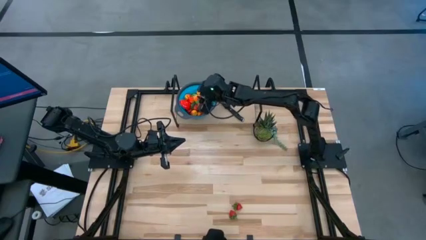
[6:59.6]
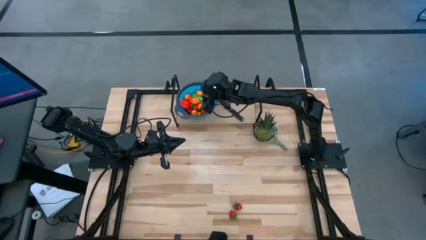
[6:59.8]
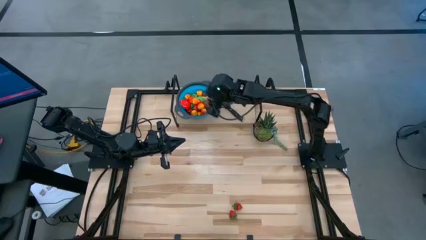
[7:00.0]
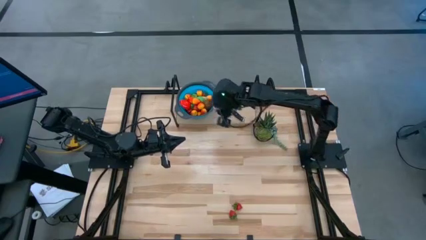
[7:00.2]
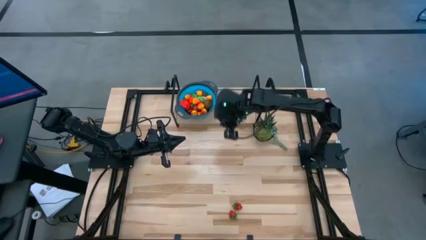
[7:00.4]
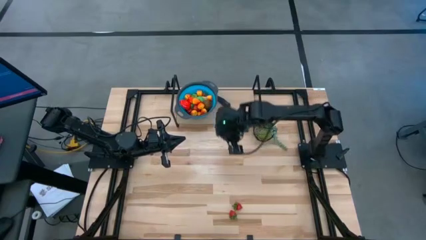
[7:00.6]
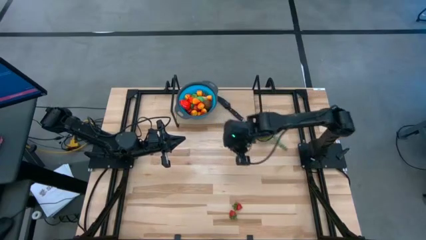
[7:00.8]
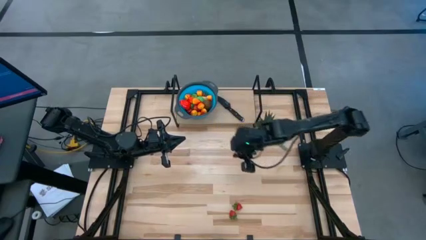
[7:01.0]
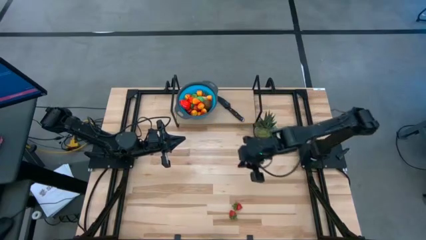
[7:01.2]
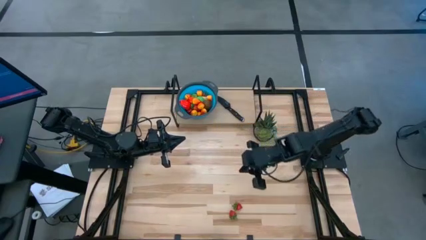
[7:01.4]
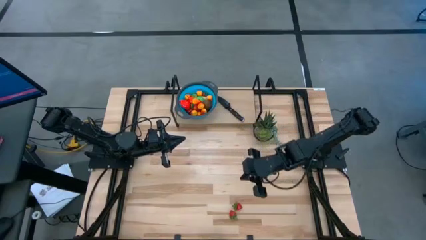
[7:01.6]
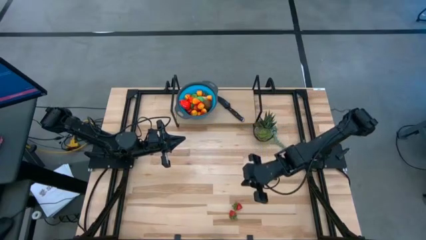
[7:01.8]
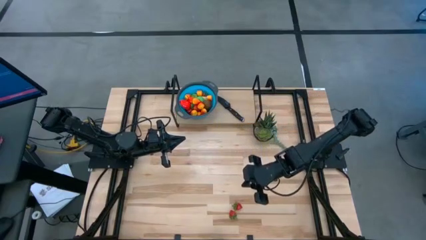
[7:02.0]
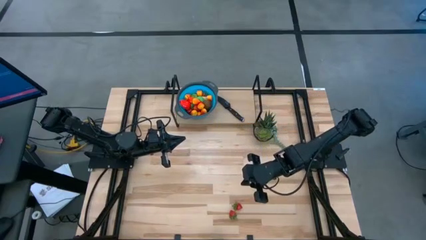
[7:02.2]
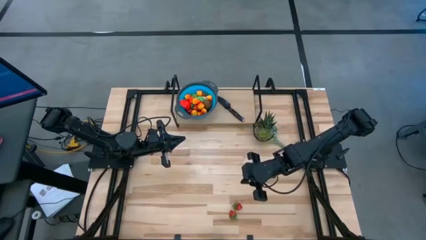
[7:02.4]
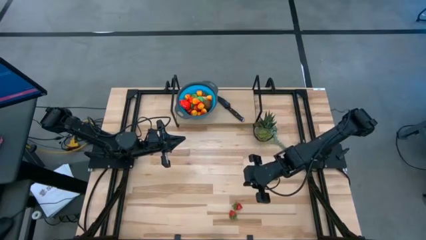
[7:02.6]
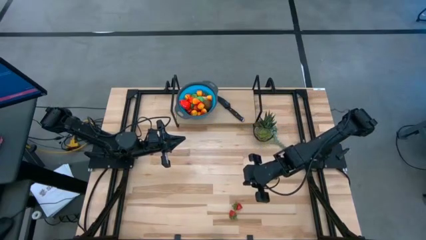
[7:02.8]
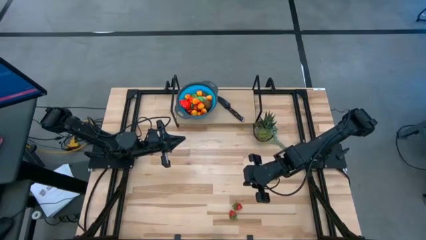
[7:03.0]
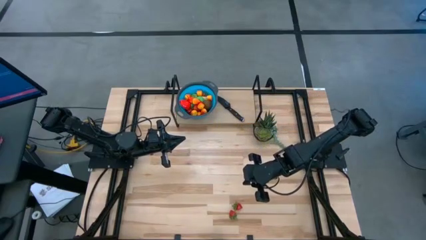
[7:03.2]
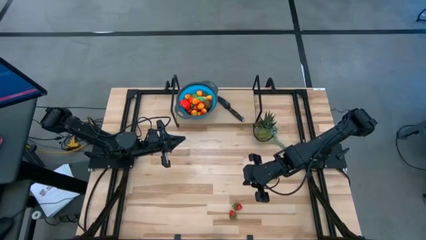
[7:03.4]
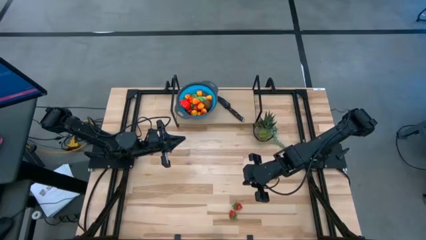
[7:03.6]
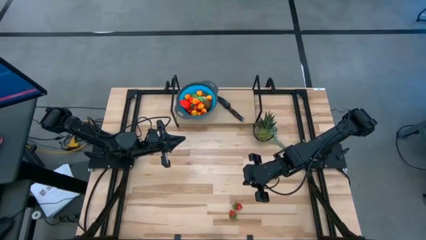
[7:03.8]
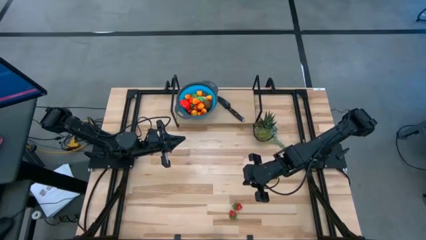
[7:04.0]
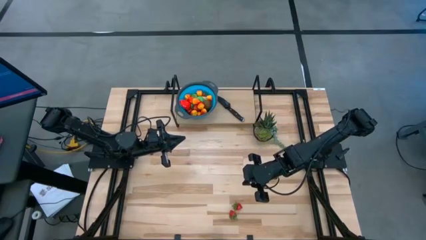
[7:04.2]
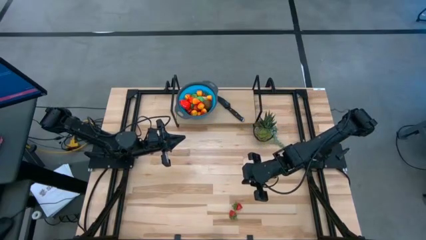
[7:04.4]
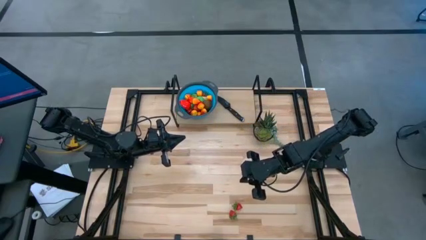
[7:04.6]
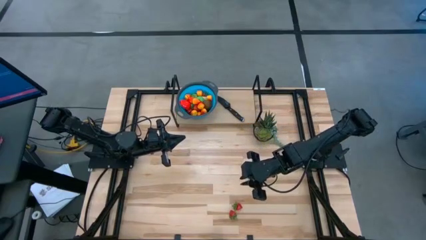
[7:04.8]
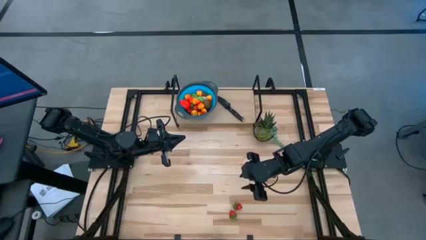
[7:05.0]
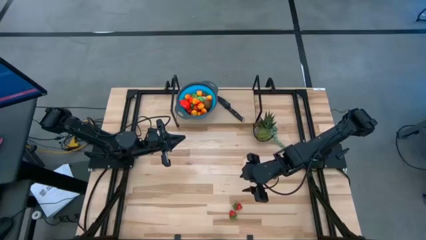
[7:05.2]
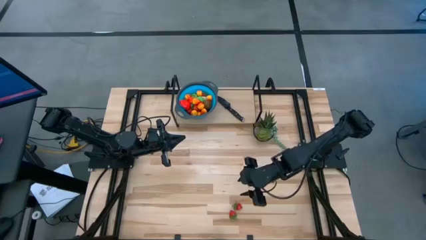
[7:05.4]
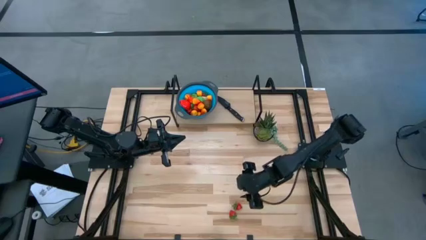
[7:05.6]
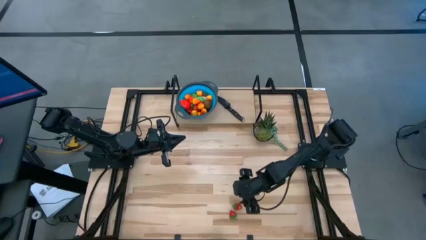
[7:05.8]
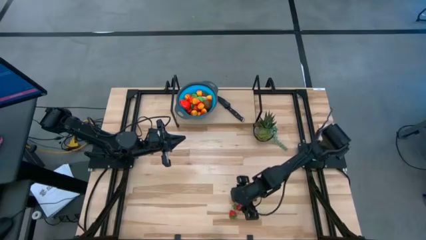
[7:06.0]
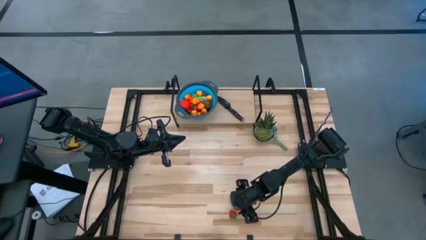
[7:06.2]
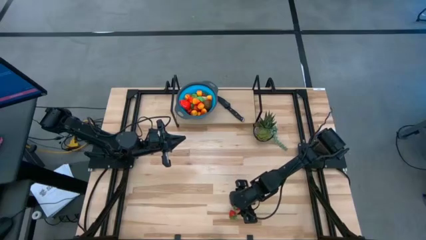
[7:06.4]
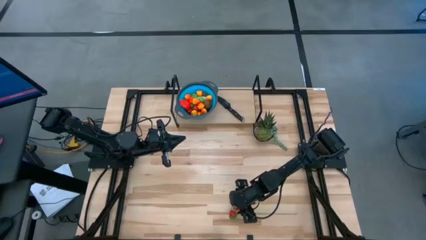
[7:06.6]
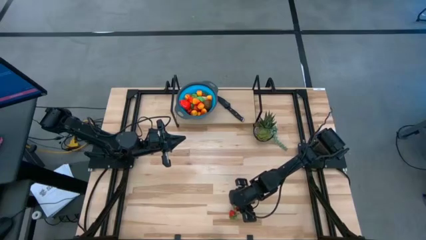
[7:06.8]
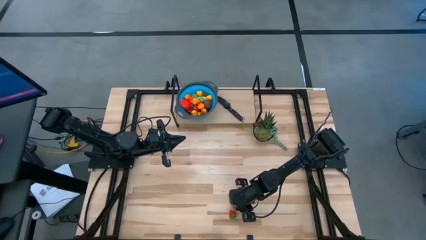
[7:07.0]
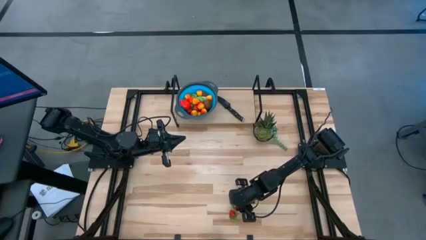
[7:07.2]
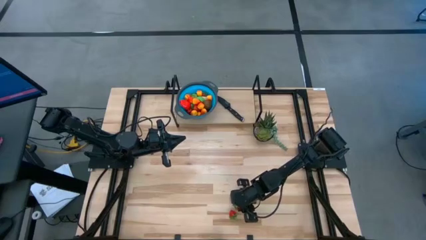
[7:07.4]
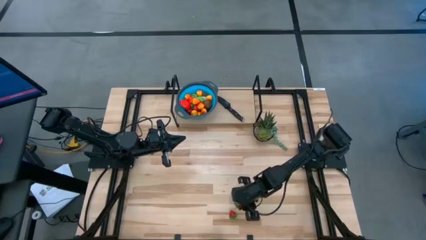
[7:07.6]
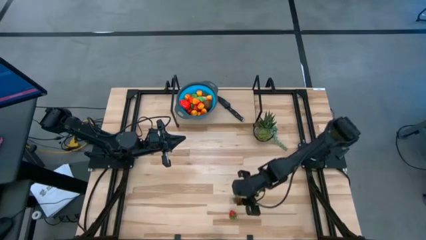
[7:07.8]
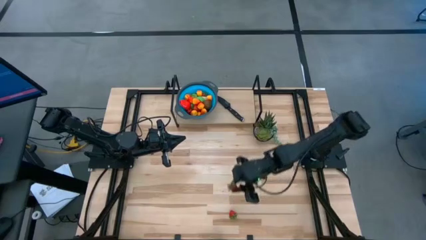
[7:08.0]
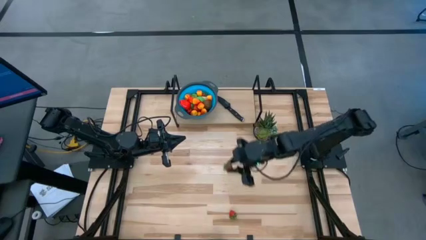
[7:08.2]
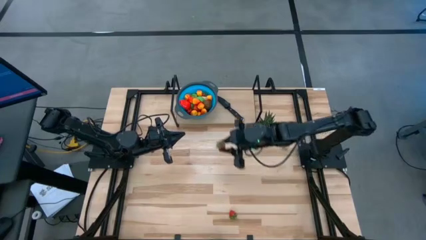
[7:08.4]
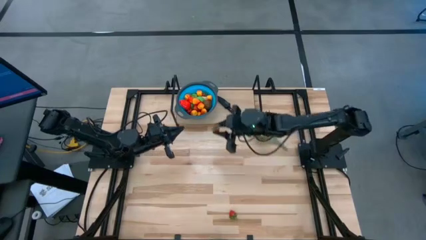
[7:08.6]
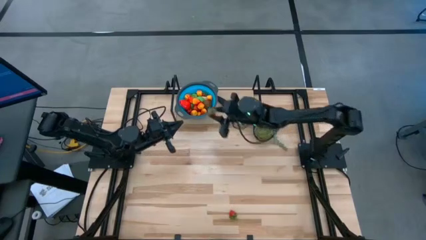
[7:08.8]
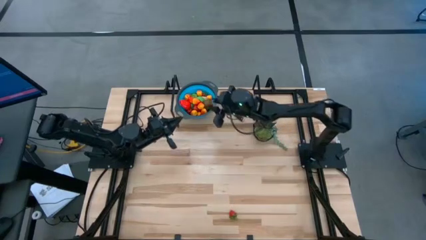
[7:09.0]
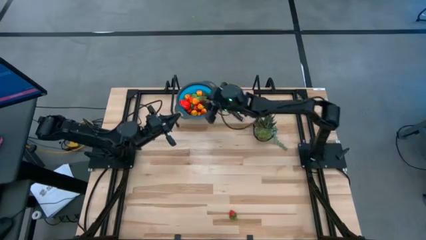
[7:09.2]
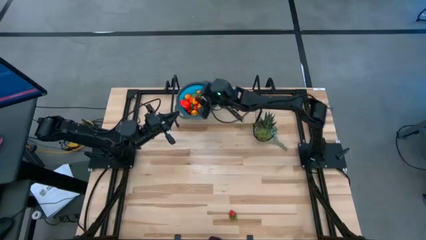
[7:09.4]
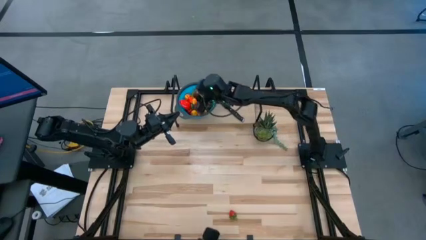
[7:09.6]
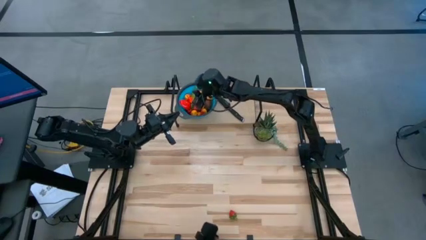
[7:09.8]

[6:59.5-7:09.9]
Task: Pick & Place Fruit
Put the strawberry into the basket

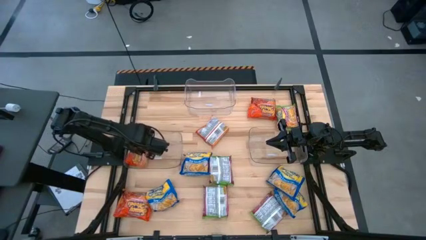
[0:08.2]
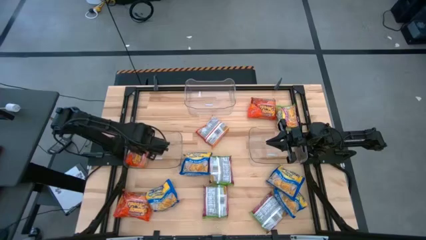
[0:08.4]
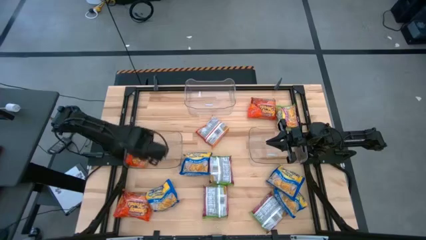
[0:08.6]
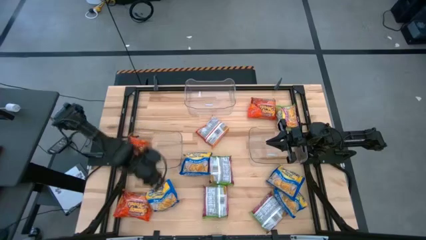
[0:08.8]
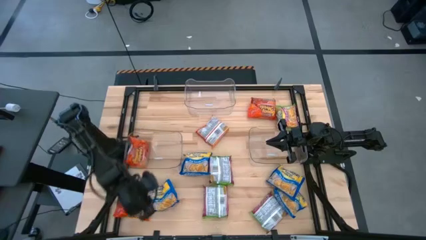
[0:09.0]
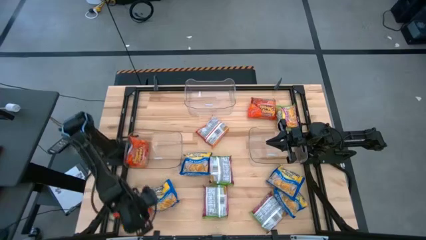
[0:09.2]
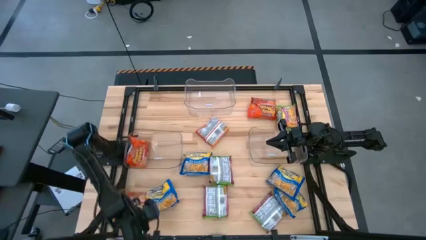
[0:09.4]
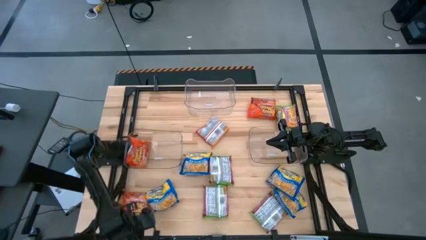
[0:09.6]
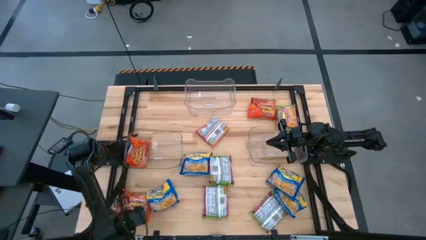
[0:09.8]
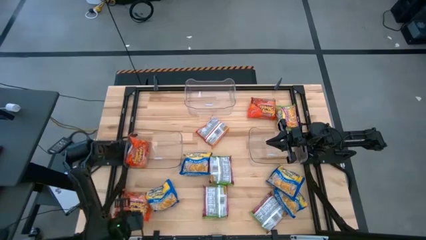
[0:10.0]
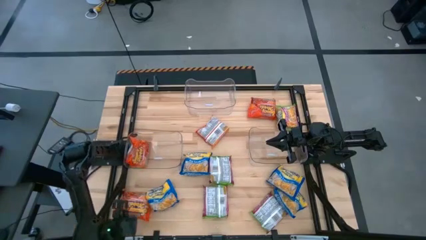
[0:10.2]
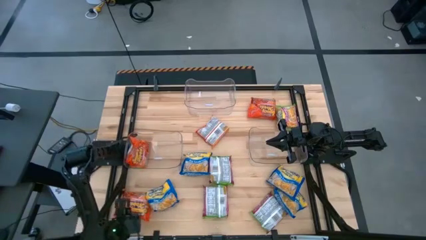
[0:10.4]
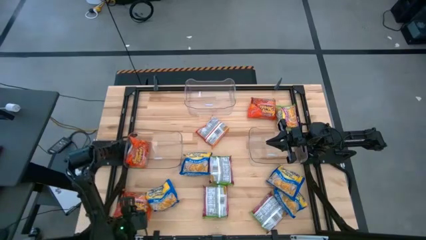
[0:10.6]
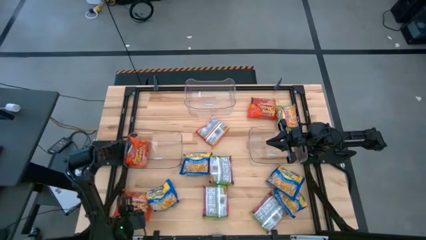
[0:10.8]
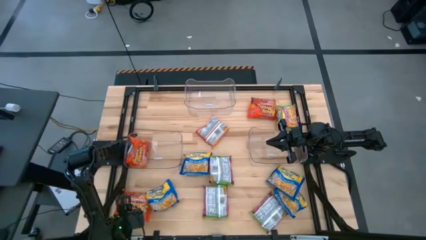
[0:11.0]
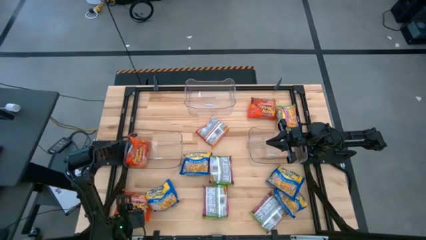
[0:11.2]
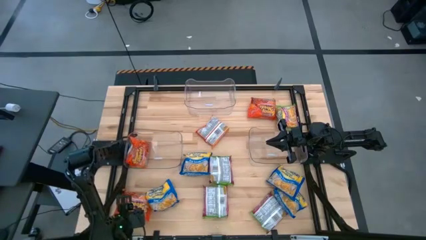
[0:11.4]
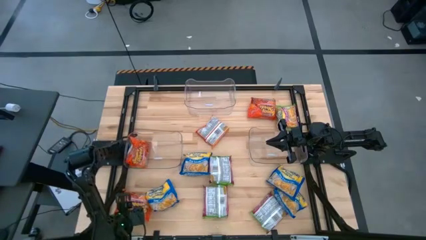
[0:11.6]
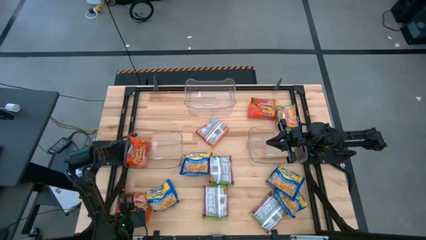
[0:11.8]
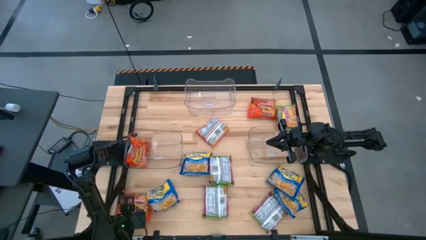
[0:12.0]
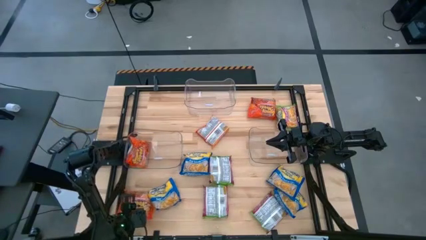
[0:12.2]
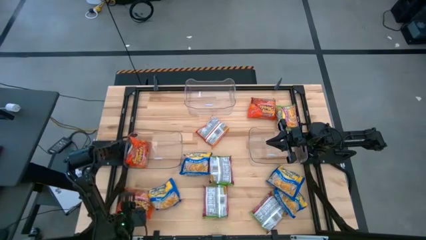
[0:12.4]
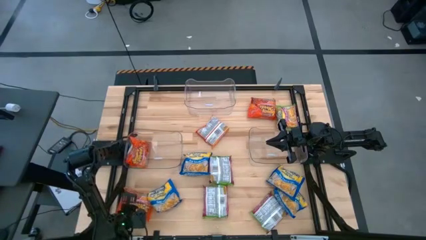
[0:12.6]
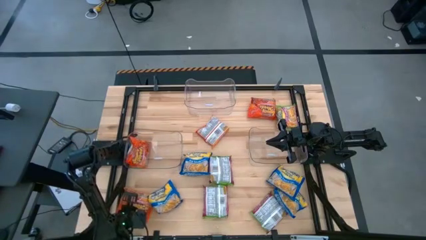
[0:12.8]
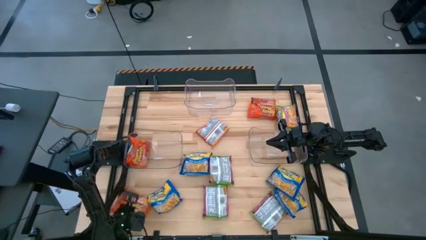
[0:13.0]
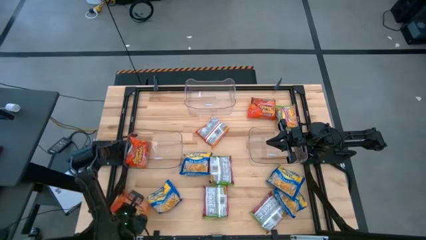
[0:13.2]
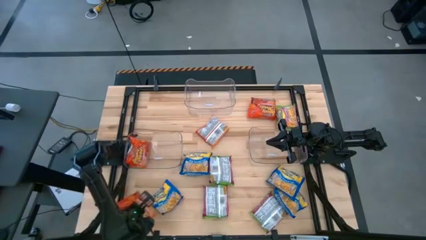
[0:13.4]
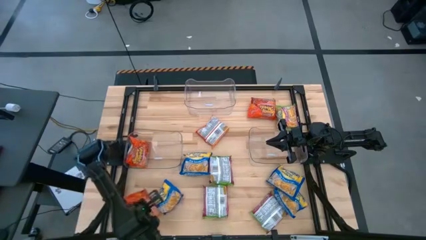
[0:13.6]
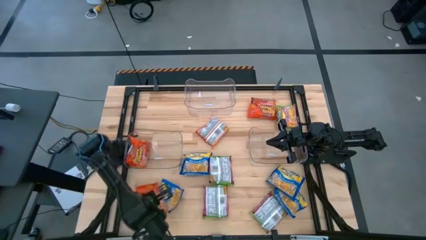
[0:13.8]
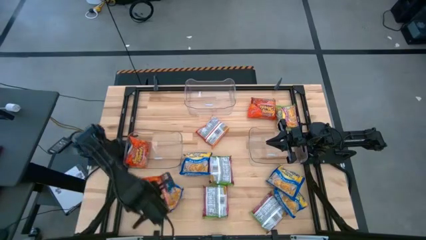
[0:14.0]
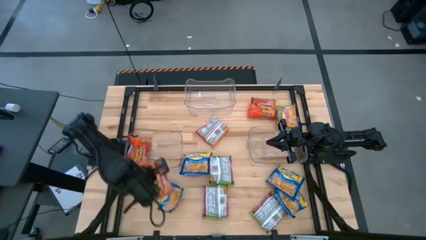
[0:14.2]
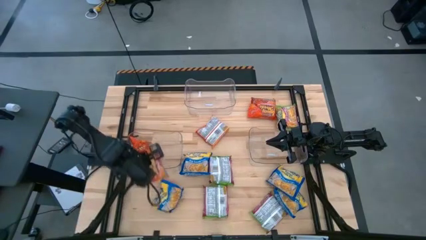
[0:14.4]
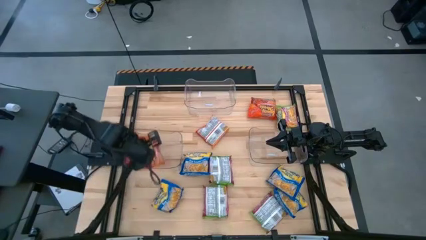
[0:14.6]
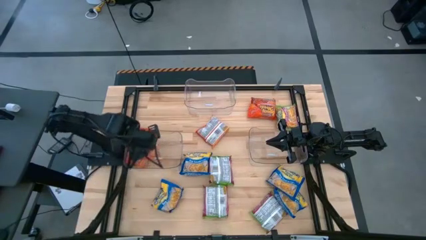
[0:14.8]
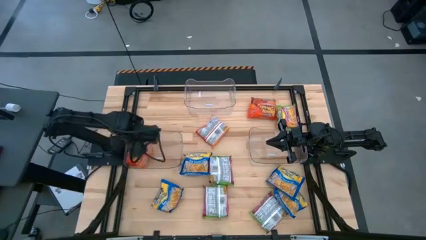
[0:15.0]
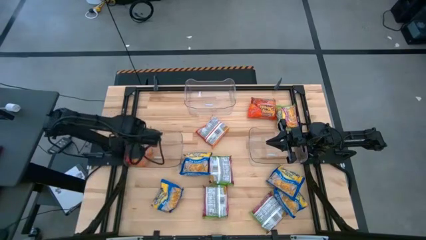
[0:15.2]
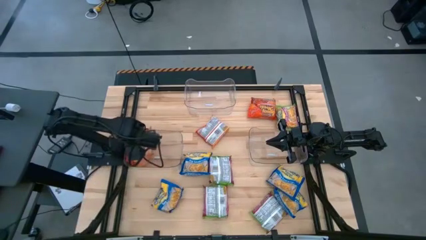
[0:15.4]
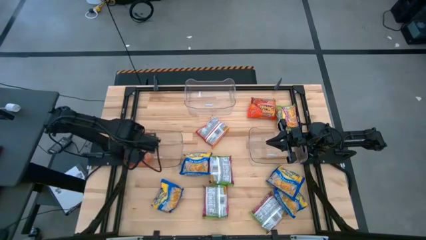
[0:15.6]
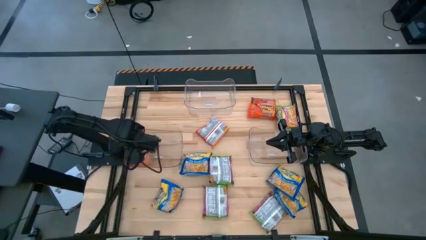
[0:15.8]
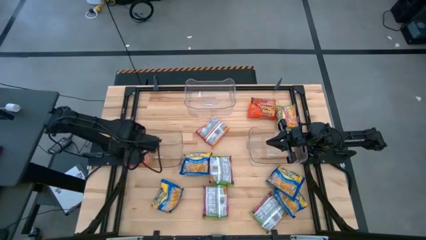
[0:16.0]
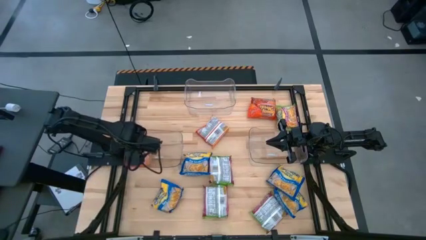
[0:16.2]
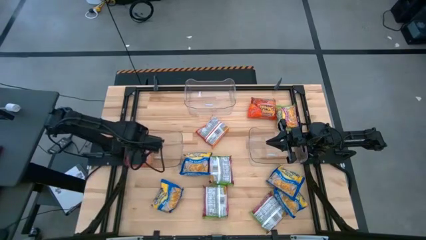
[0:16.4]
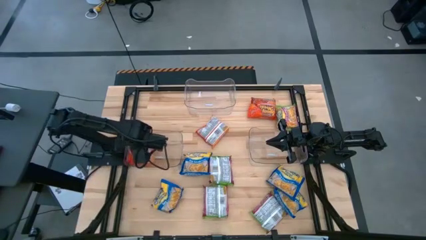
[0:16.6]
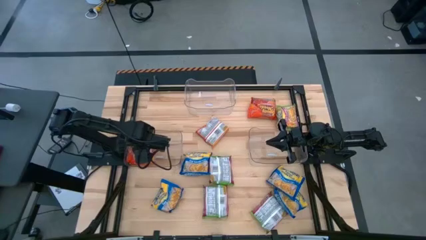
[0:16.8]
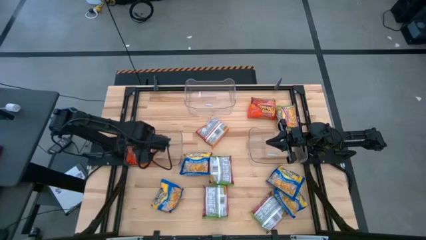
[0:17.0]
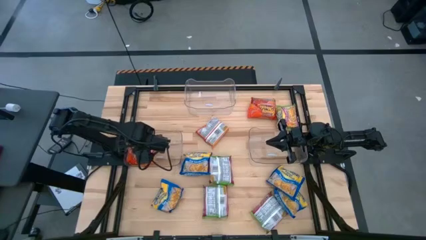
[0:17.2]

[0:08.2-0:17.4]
Task: Sort Maruchan noodles
Put the orange noodle from the bottom into the middle left transparent bin
